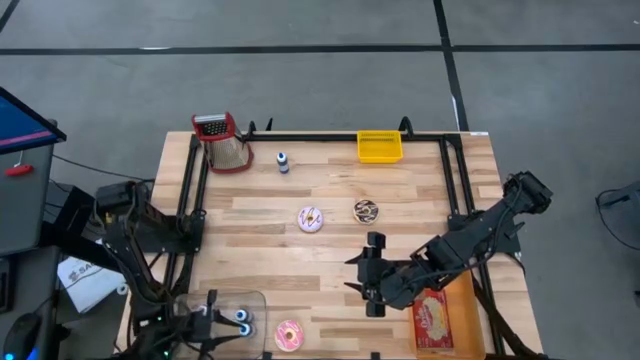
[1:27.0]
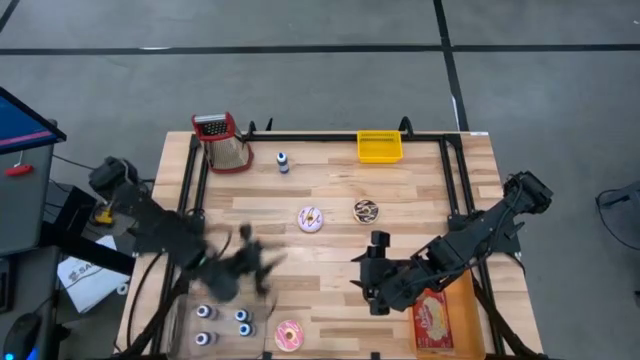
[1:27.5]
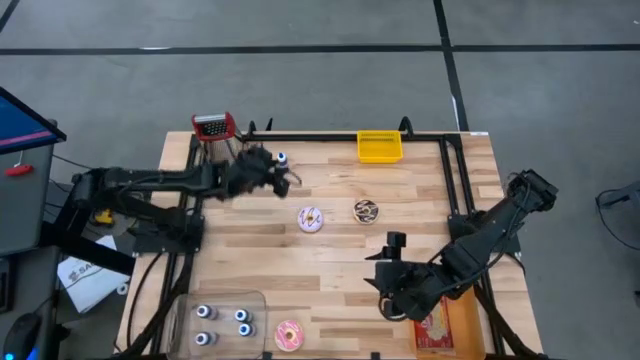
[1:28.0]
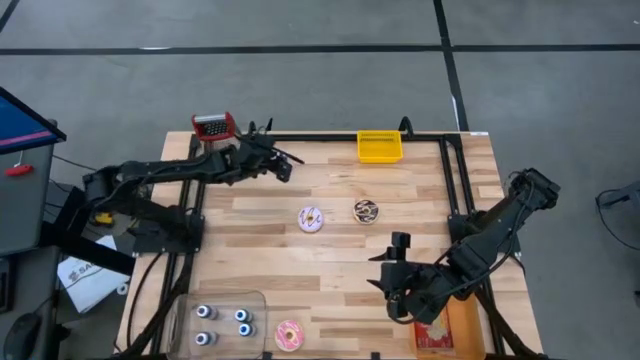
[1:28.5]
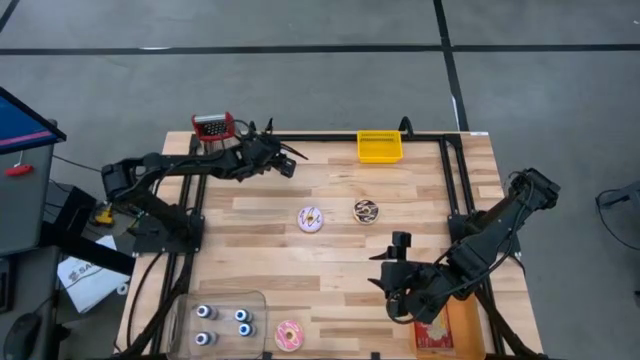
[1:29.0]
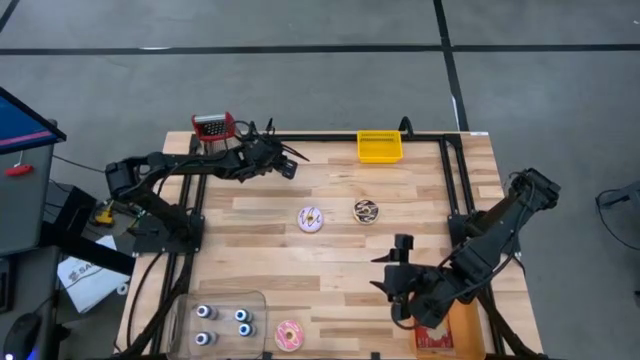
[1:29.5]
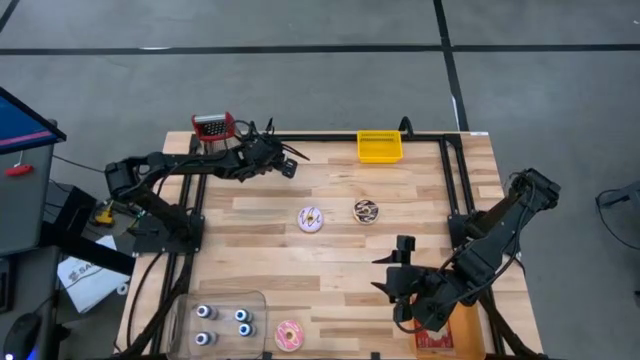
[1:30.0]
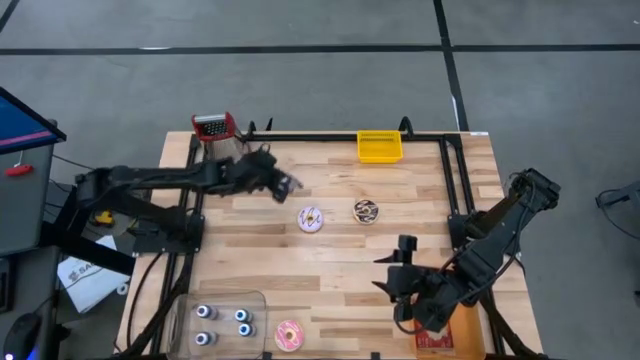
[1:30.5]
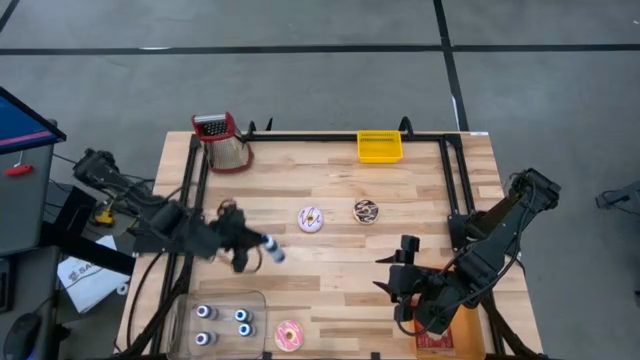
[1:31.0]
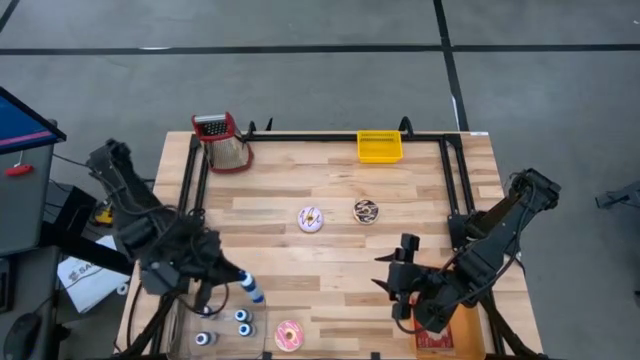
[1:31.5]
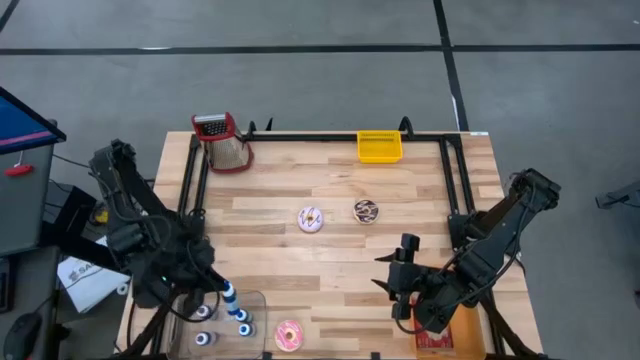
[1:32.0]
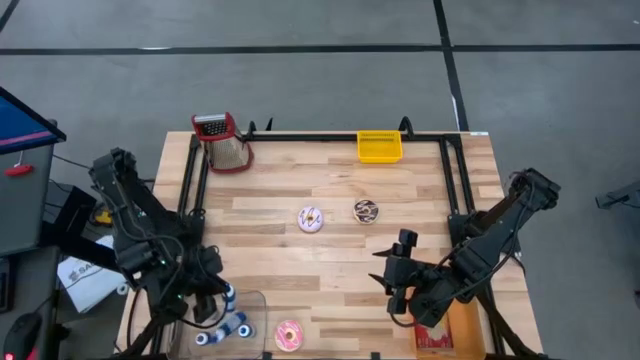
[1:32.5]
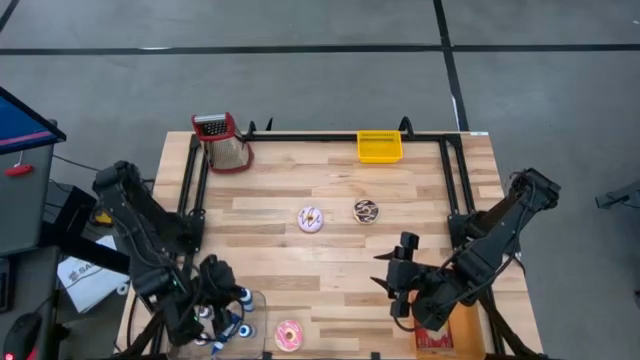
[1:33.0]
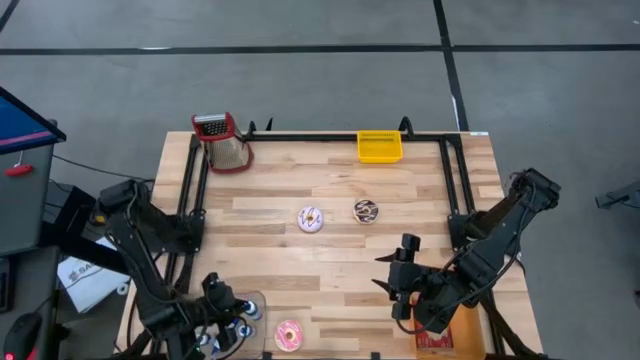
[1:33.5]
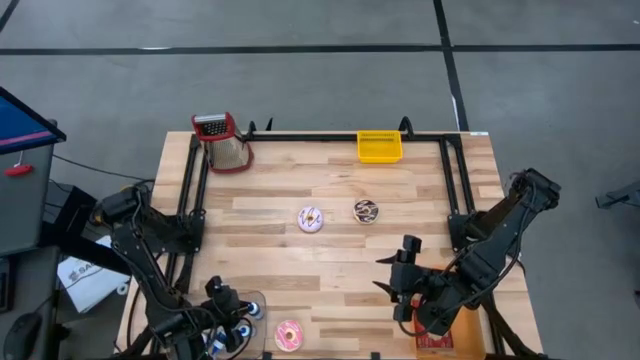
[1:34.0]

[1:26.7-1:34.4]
Put the blue food coloring bottle into the transparent bin

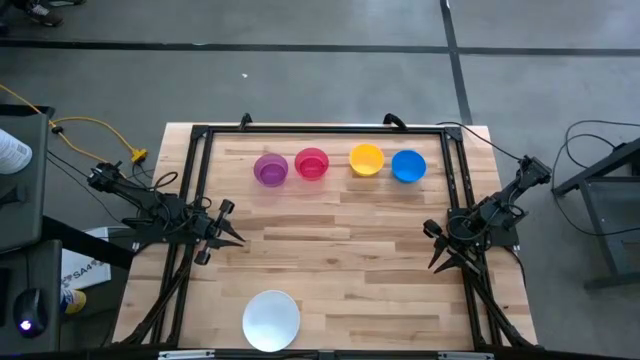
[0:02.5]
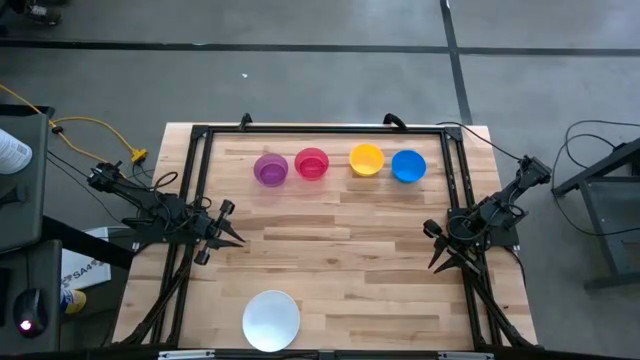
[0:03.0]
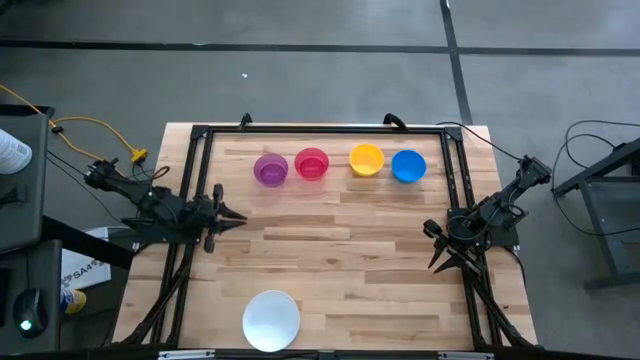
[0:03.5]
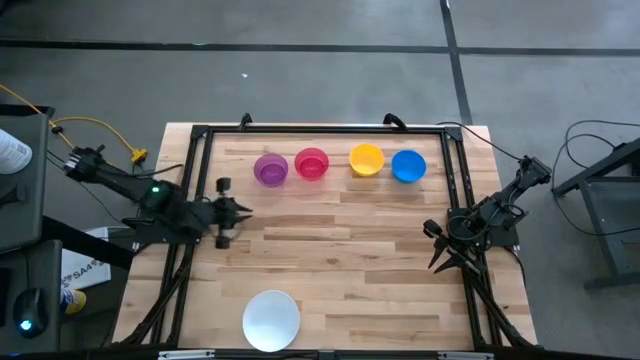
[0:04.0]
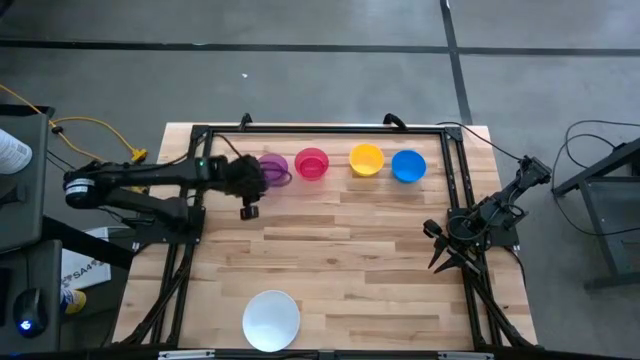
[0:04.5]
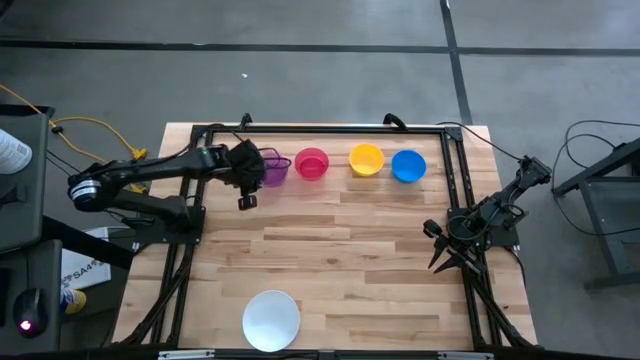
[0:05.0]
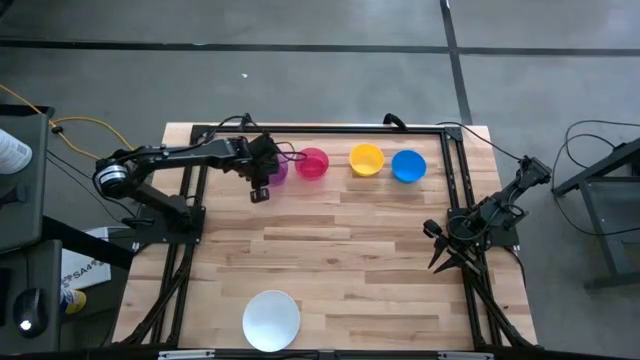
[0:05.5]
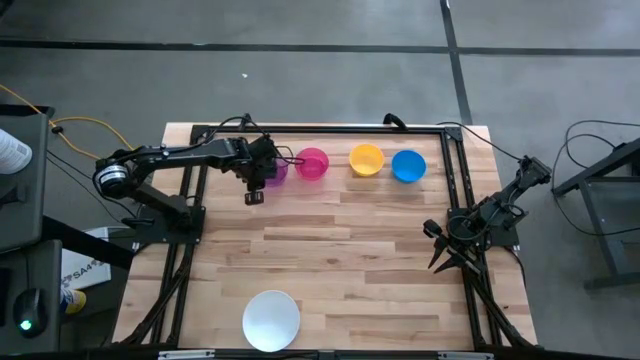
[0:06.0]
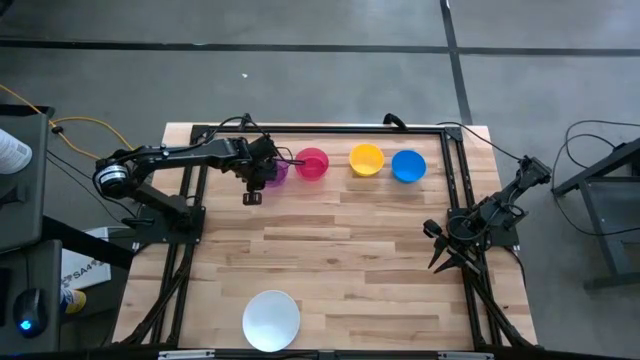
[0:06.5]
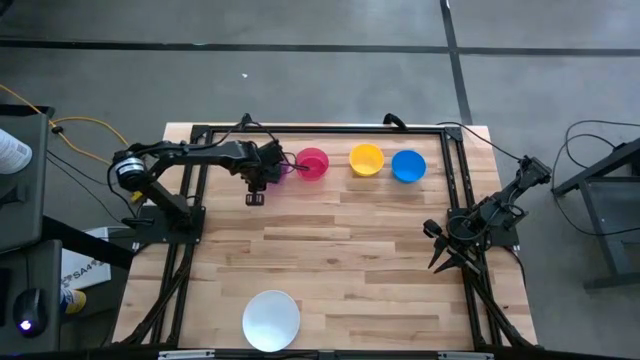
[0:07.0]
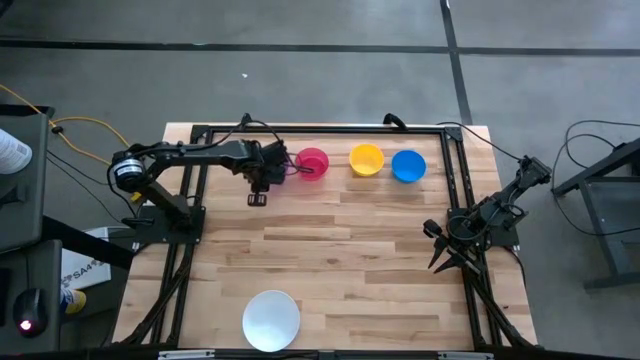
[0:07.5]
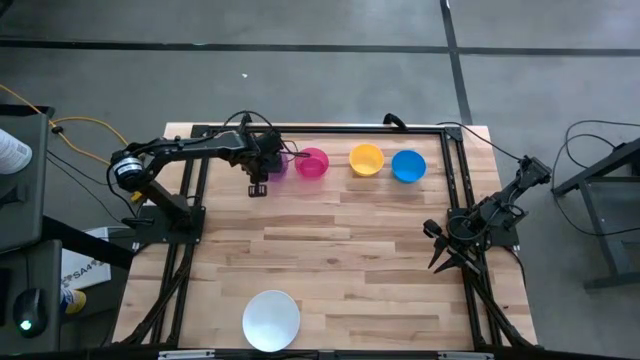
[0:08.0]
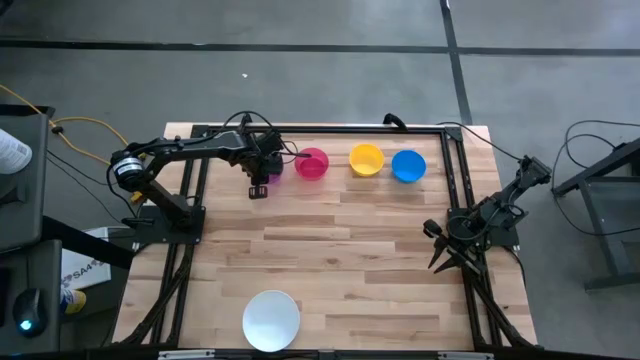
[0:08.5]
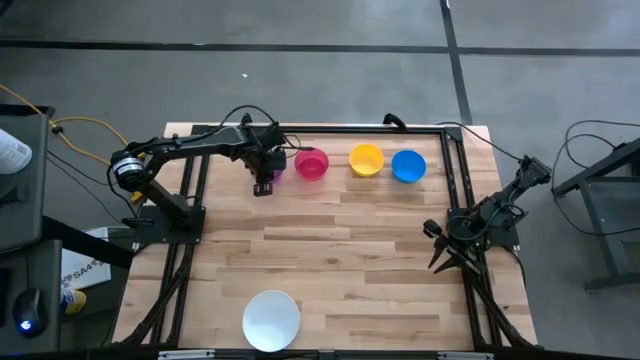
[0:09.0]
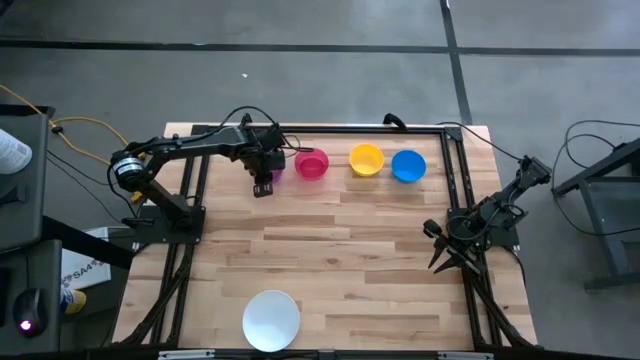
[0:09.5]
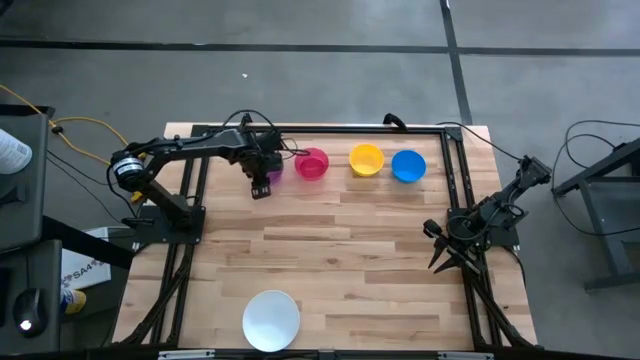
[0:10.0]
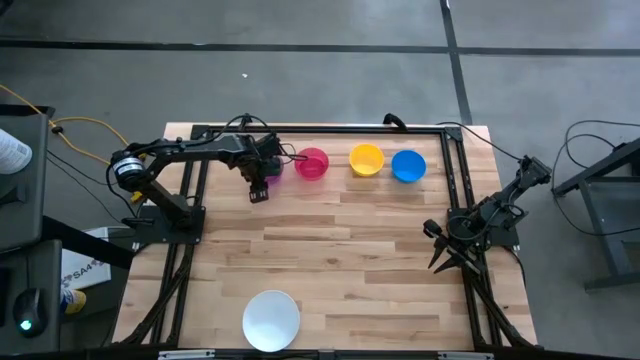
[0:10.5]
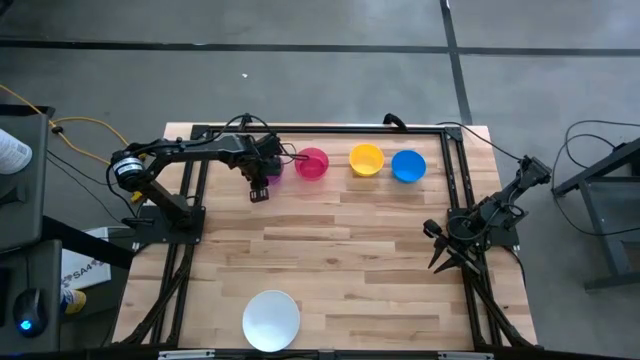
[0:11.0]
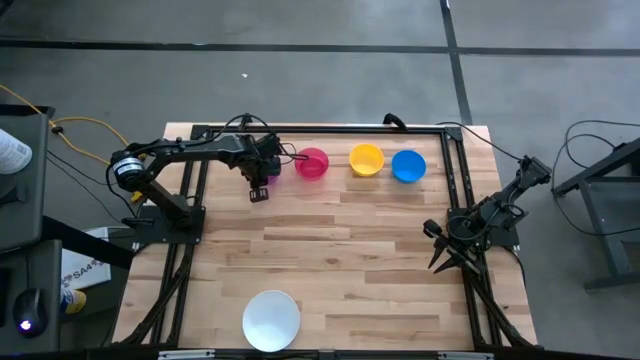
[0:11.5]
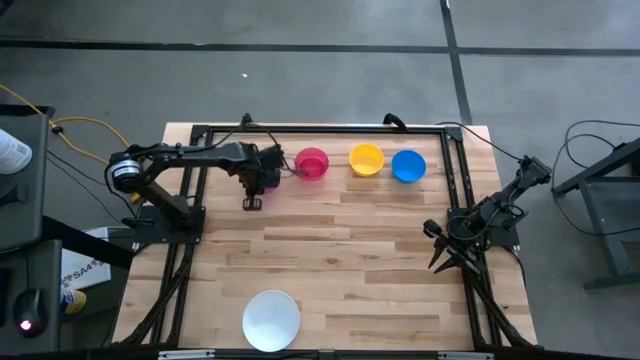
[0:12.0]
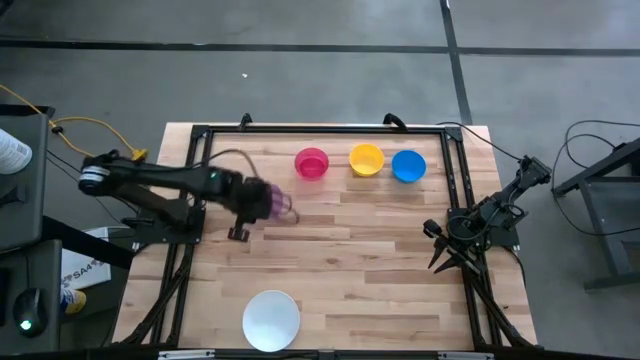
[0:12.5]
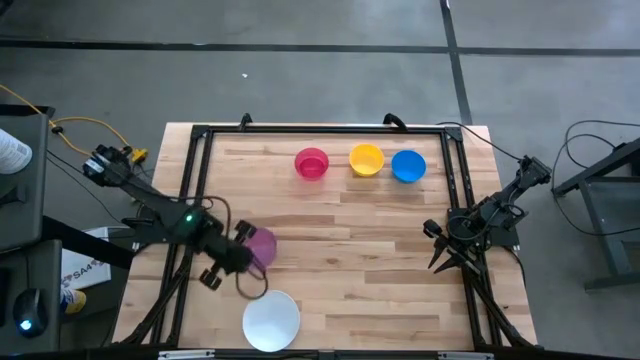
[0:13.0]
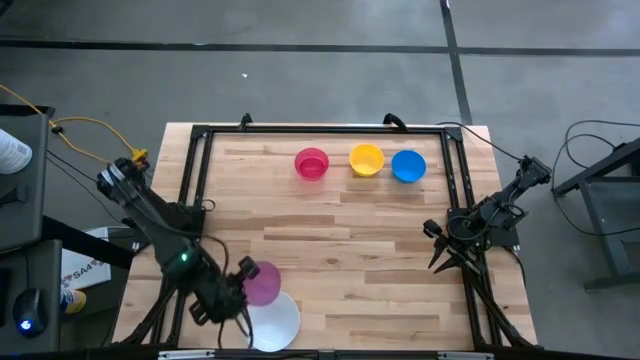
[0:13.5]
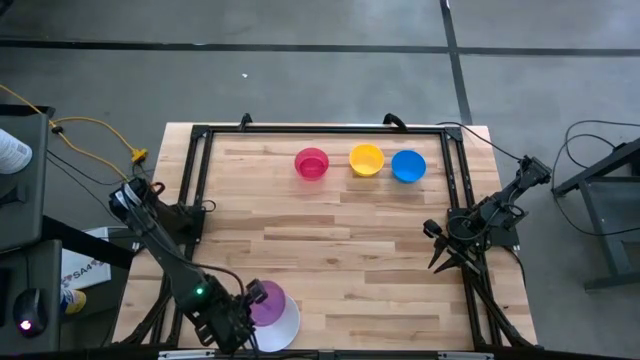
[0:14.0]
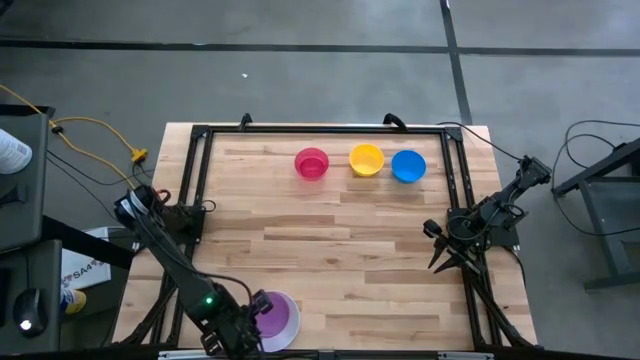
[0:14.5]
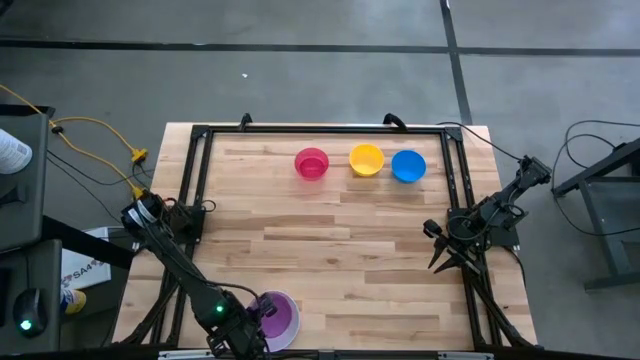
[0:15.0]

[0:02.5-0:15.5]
Stack the purple bowl on the top of the white bowl
